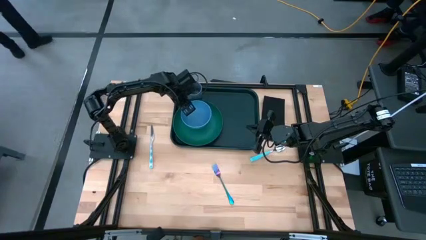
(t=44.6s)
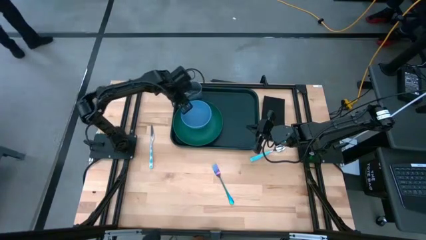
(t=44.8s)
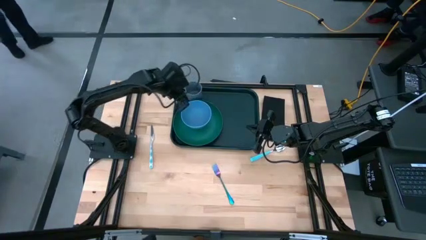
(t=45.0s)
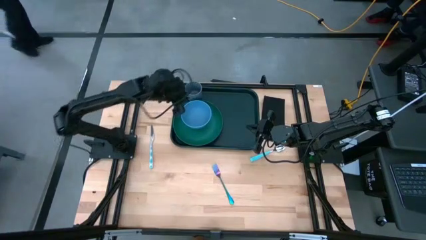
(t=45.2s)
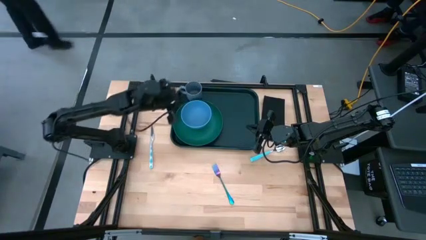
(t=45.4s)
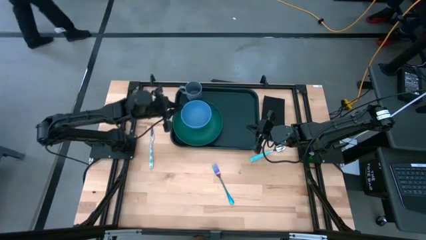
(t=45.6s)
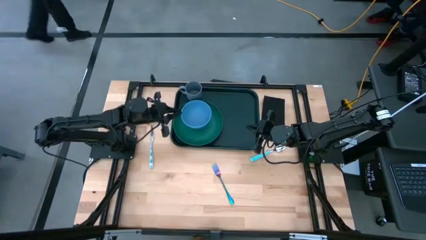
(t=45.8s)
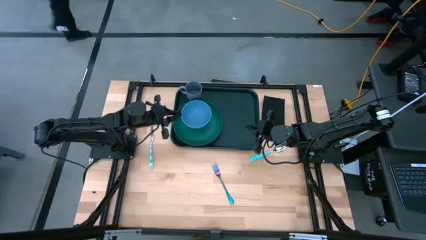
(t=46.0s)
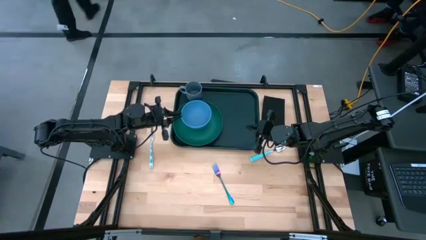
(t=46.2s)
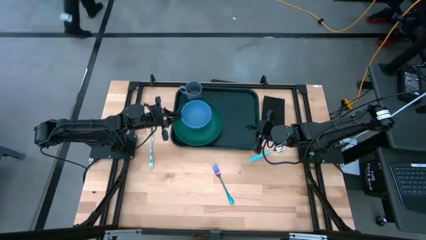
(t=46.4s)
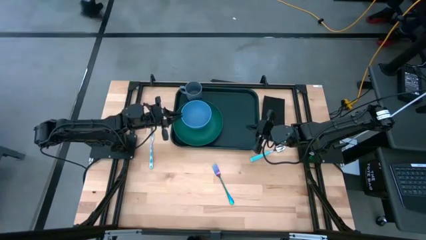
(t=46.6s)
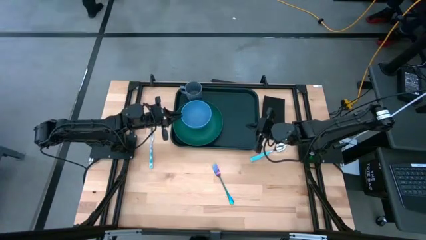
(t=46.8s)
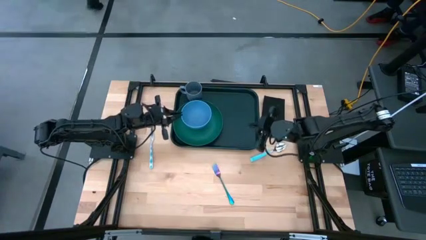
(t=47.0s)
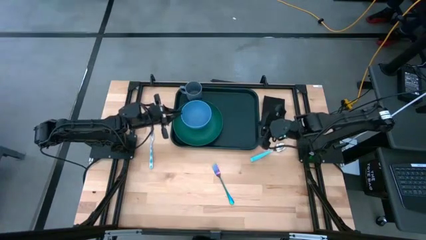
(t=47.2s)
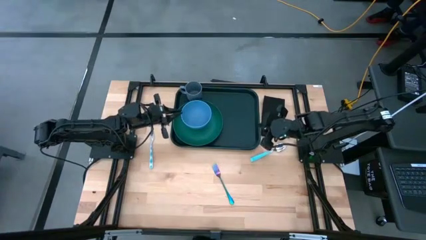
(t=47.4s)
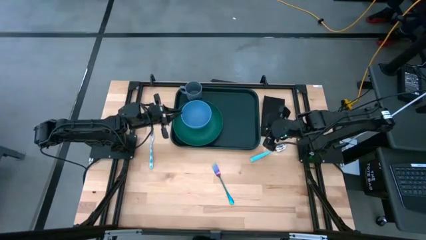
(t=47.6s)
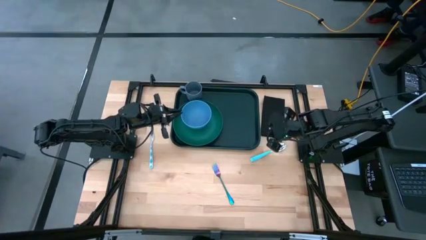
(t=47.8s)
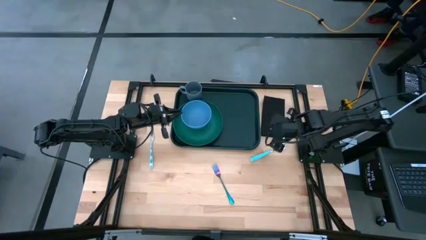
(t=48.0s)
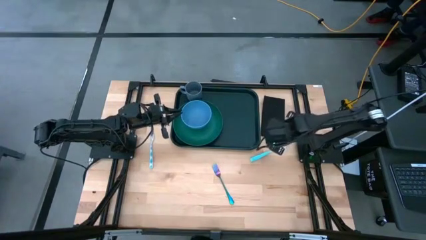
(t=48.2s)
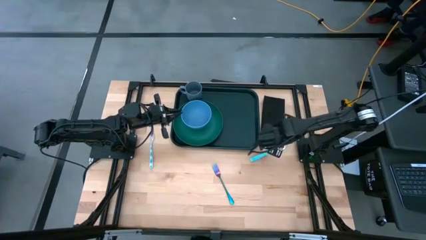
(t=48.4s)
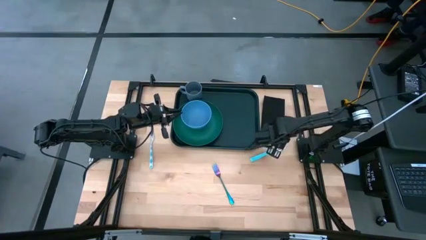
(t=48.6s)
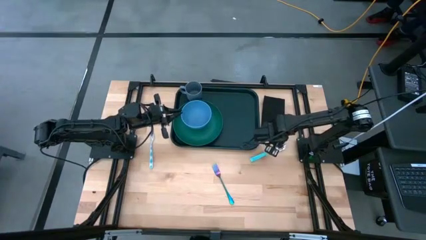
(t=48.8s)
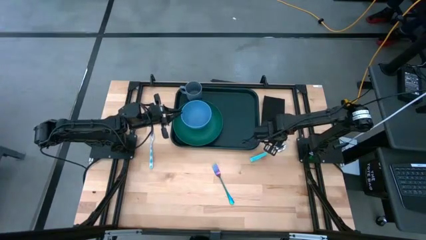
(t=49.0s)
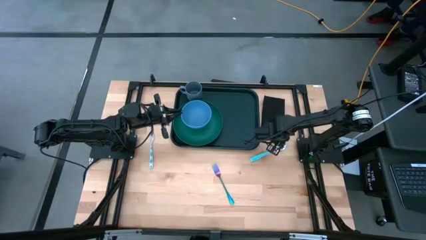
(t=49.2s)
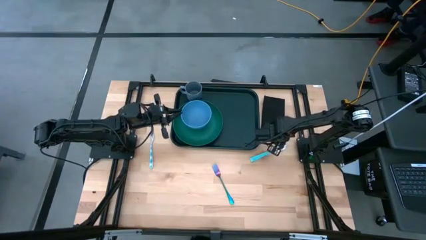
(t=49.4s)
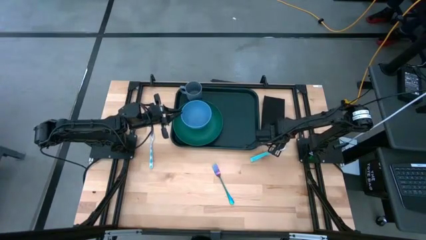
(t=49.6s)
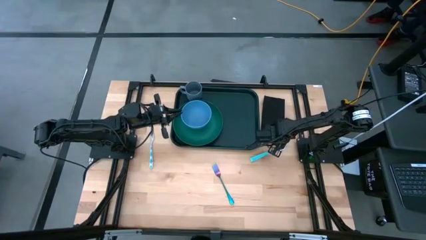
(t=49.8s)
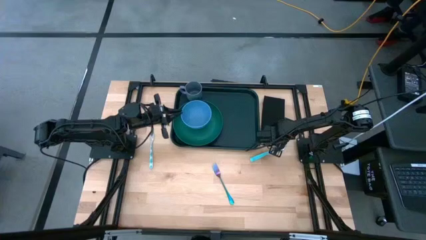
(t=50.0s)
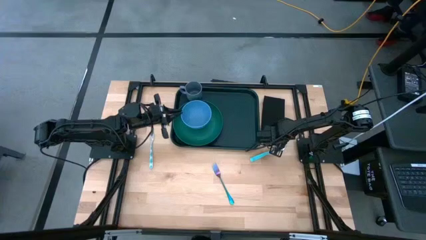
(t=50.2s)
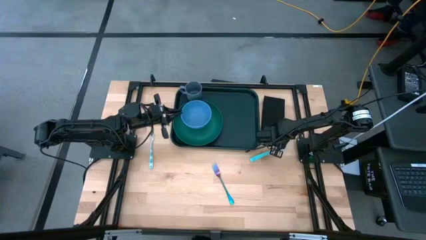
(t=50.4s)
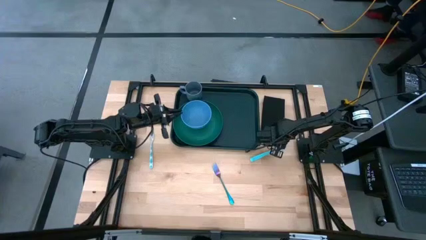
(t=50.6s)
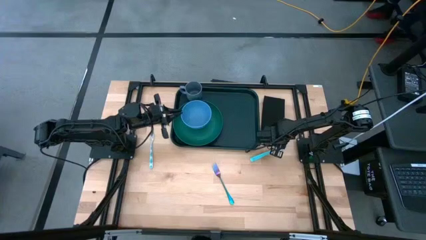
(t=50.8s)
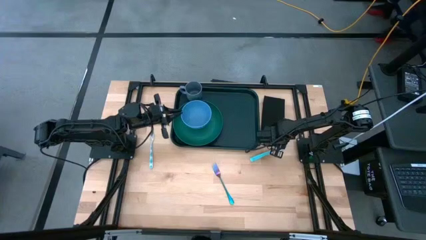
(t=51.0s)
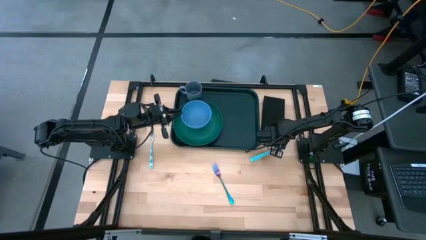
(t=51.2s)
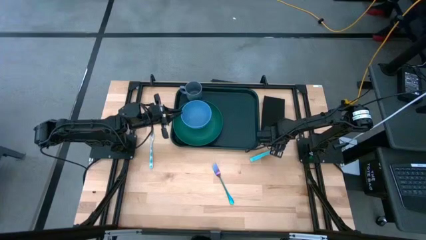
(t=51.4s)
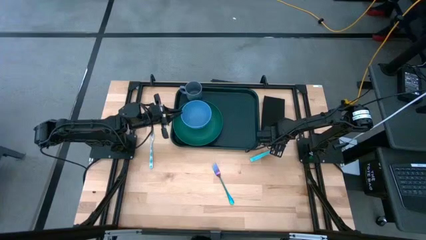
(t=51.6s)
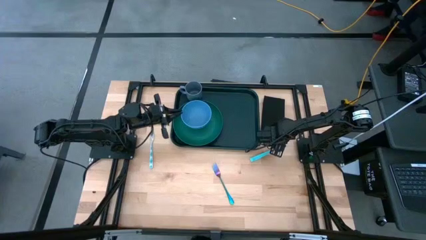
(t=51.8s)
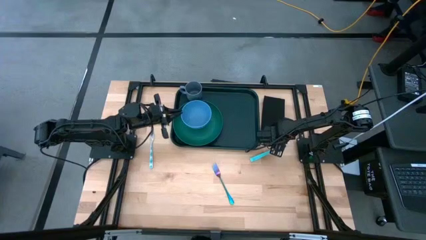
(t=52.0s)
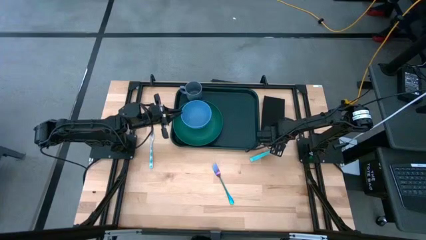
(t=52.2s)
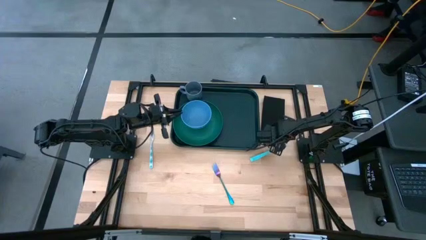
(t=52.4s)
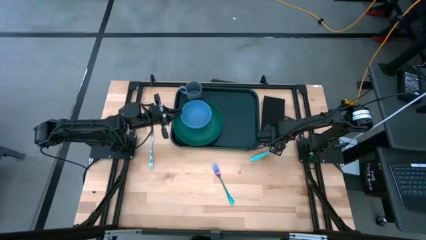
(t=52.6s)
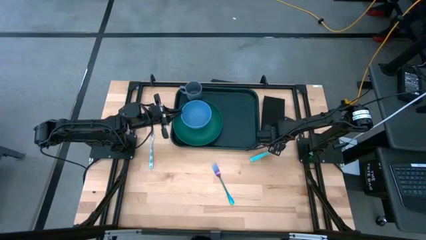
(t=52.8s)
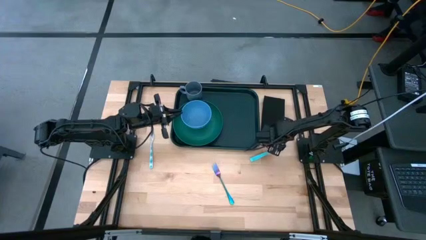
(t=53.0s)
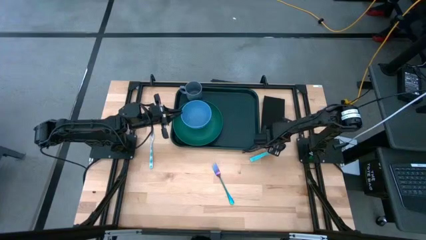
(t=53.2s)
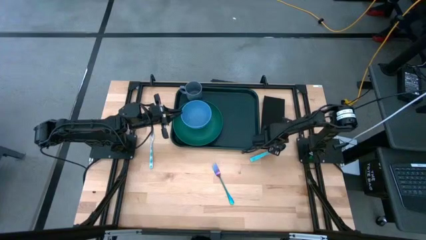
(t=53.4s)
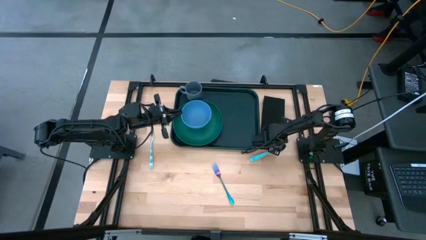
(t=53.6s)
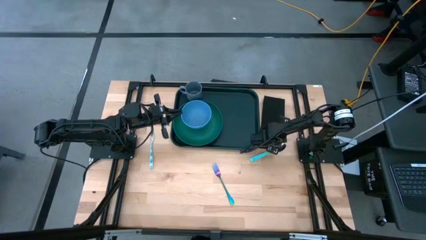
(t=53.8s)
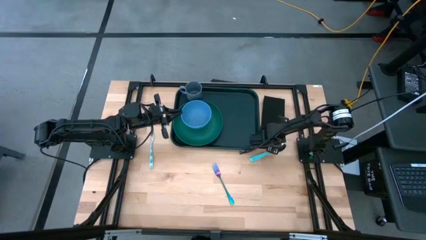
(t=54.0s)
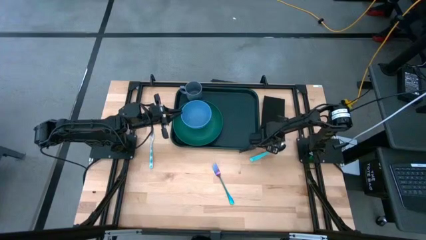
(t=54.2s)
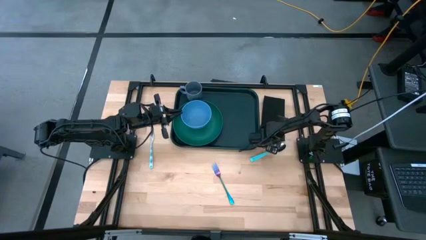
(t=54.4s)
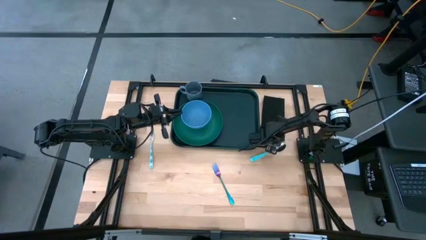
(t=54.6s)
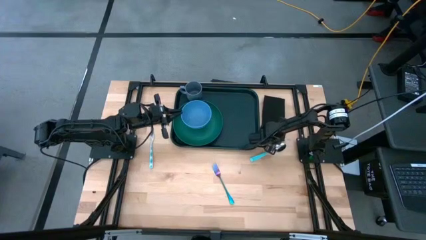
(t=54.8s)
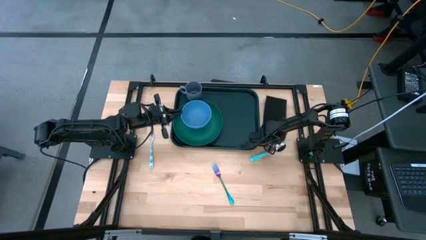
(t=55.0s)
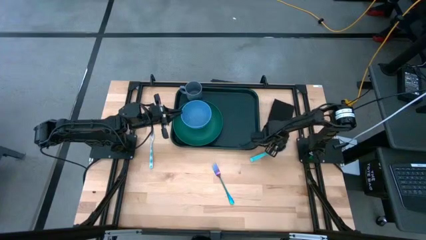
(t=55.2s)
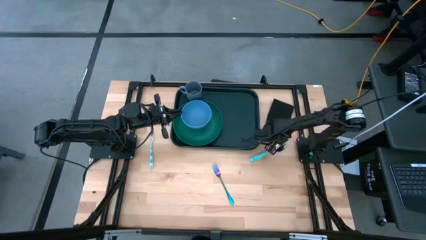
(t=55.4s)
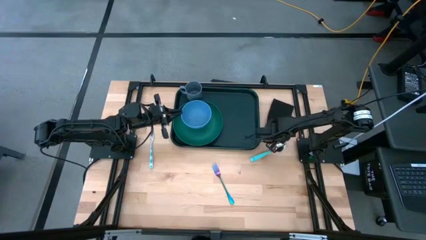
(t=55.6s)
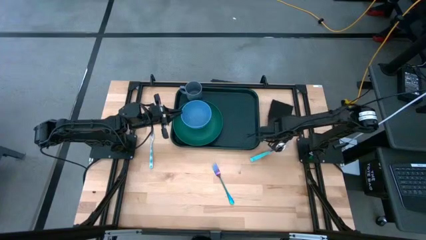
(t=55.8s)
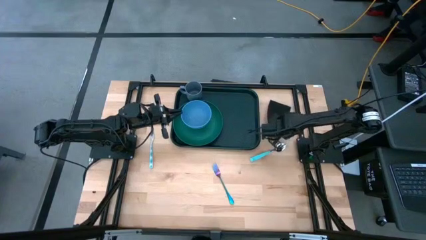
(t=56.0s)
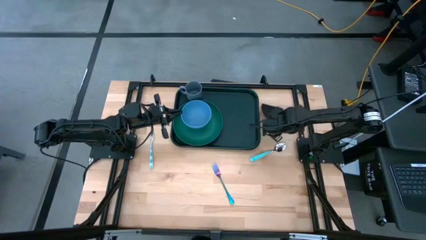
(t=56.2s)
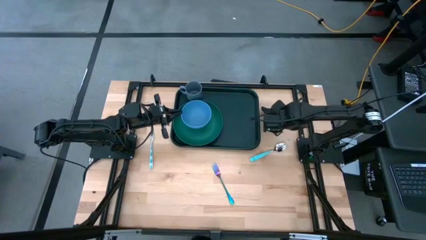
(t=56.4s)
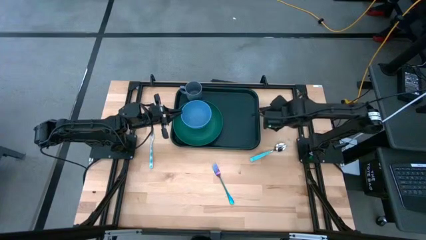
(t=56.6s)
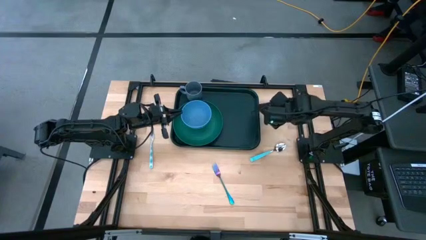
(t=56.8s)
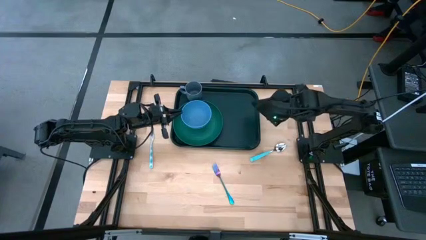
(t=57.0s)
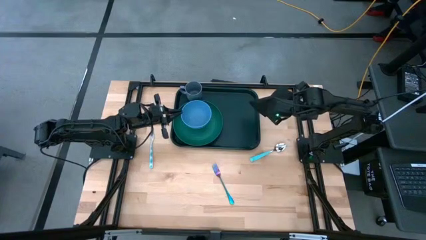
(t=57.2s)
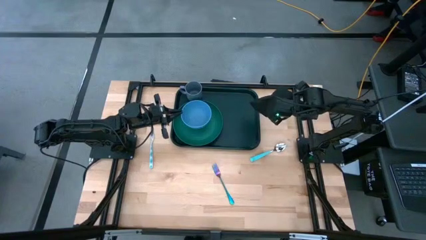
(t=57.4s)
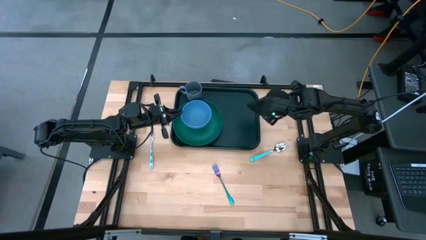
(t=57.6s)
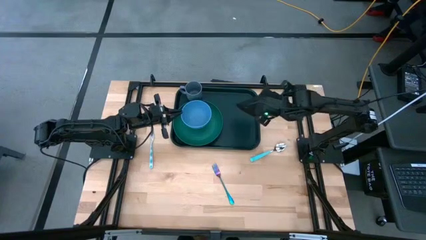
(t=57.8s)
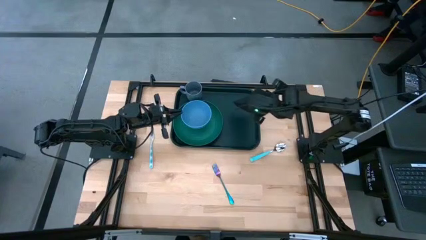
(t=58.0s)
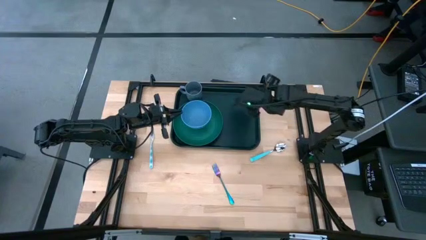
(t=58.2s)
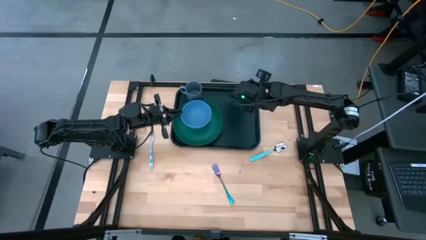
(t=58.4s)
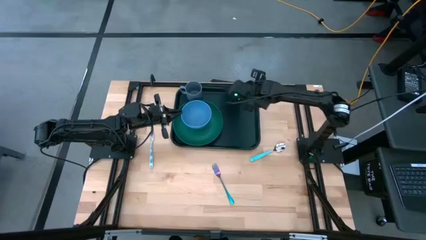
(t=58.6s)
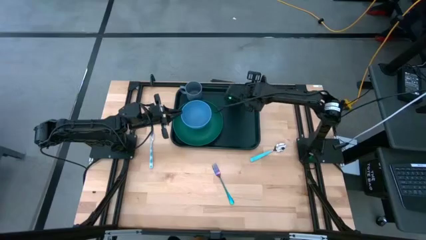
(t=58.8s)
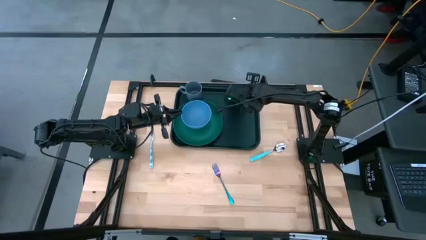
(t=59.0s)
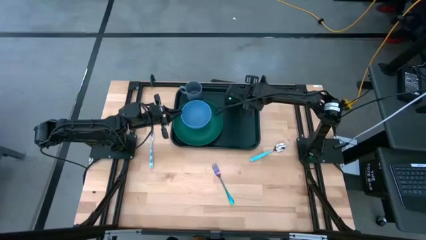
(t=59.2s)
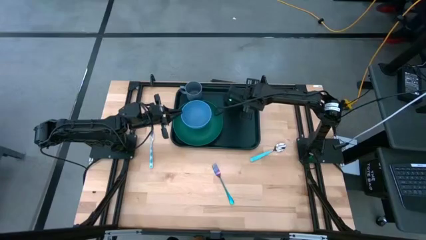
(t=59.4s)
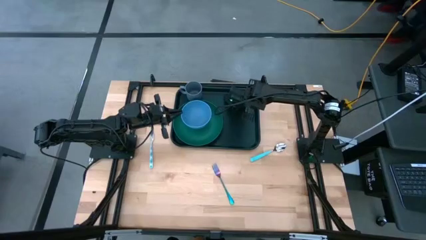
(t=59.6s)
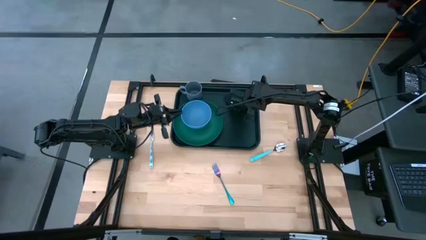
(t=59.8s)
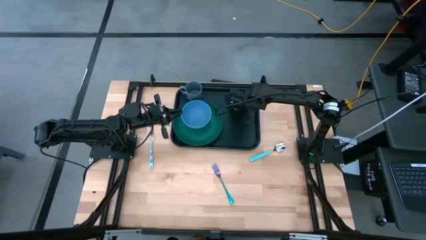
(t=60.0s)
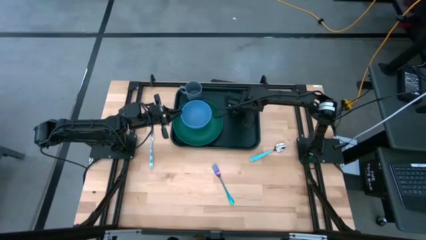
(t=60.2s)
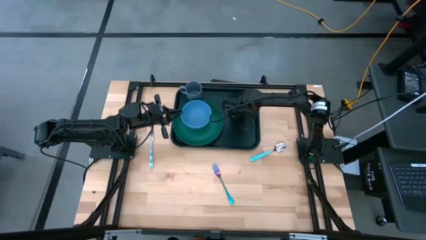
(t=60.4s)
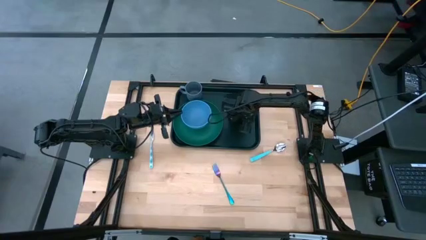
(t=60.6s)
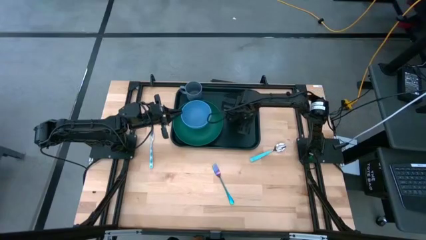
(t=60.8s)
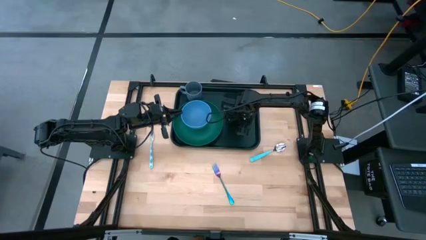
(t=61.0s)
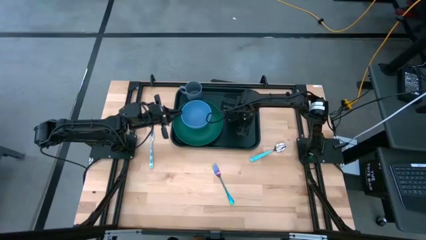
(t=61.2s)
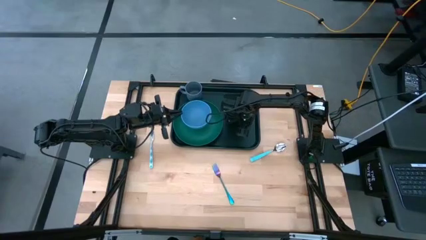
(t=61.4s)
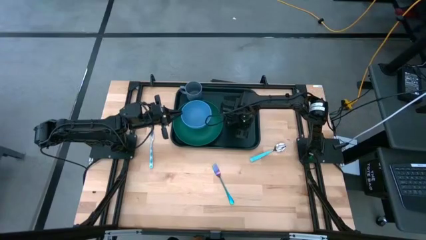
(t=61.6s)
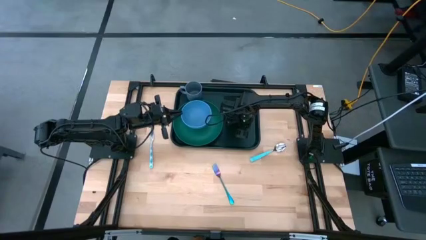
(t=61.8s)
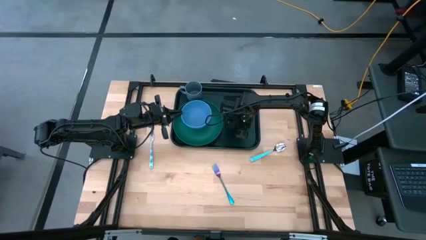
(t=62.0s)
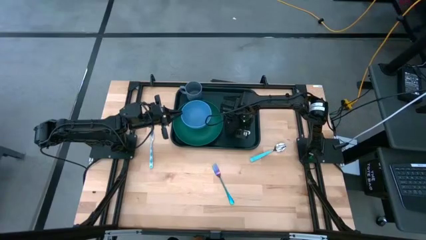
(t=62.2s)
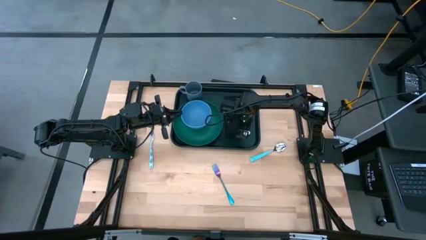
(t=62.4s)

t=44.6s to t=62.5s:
Task: Set up tray
Put the black napkin on top of the black tray left of the green plate
